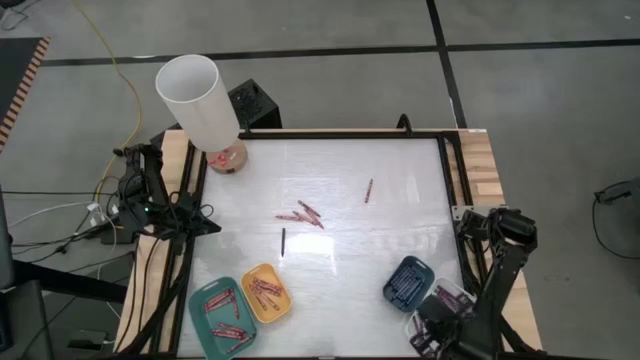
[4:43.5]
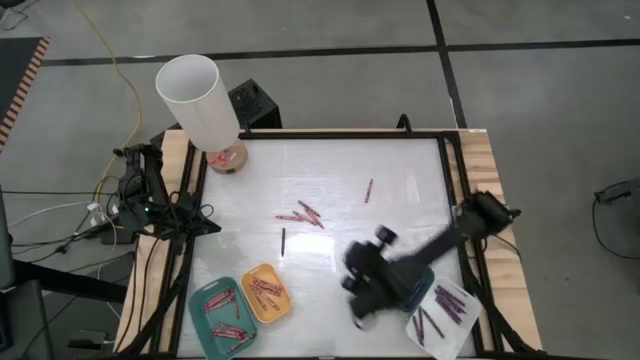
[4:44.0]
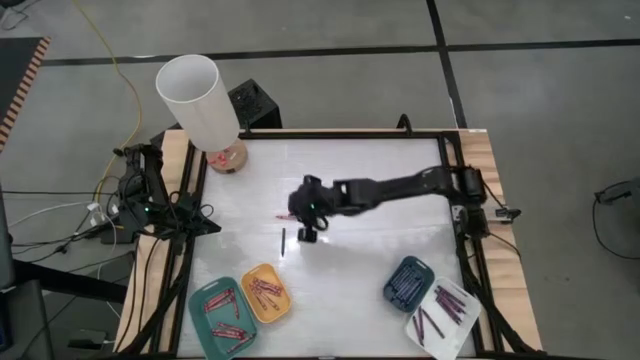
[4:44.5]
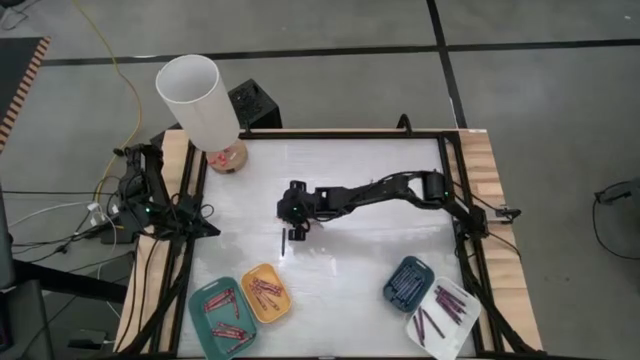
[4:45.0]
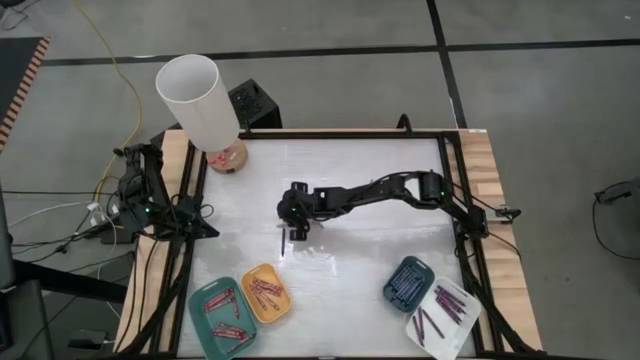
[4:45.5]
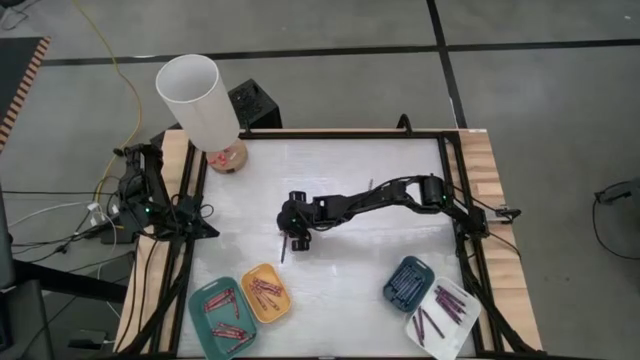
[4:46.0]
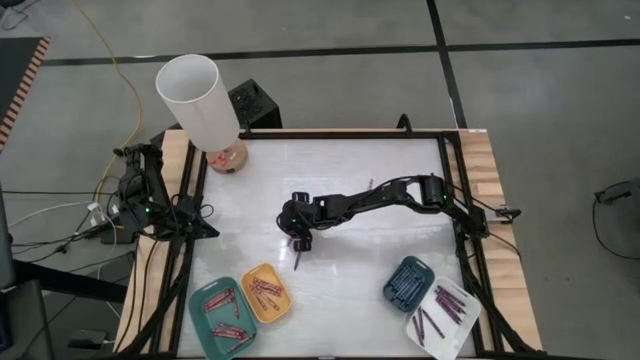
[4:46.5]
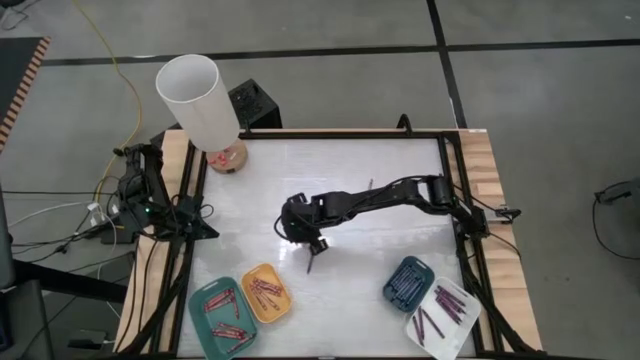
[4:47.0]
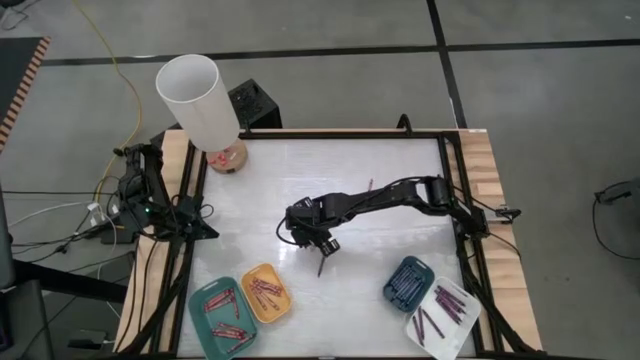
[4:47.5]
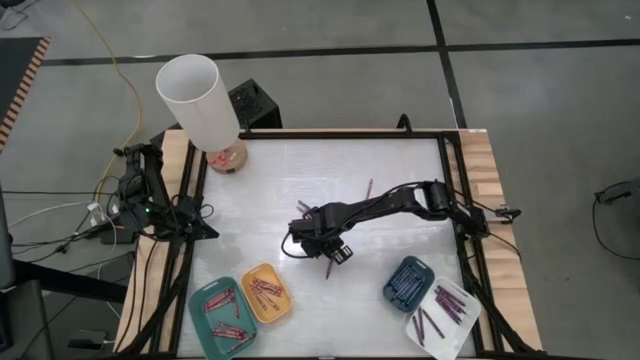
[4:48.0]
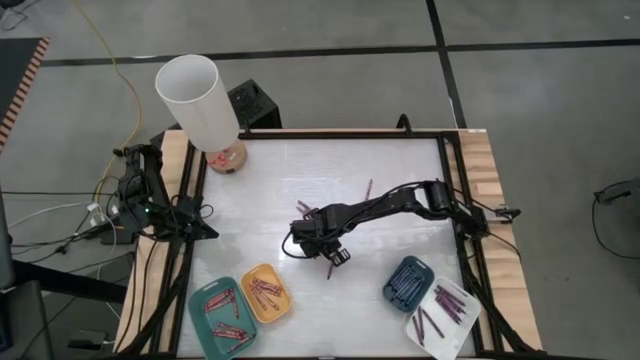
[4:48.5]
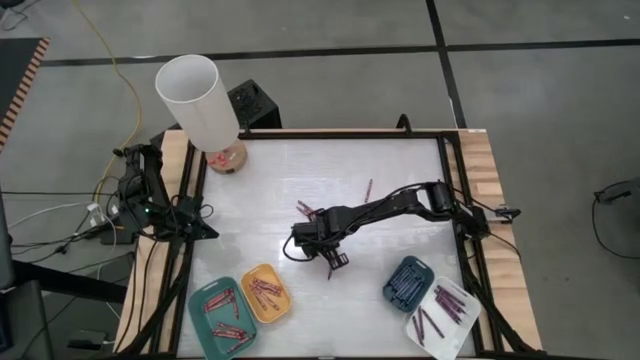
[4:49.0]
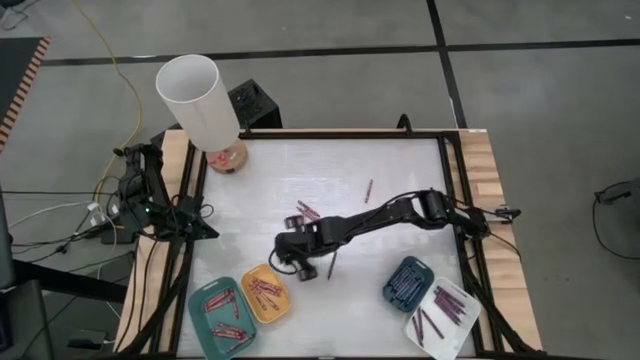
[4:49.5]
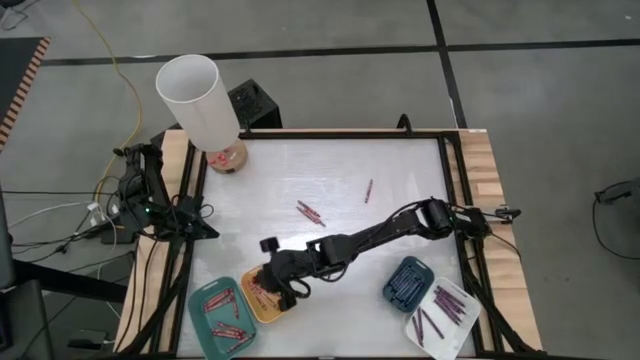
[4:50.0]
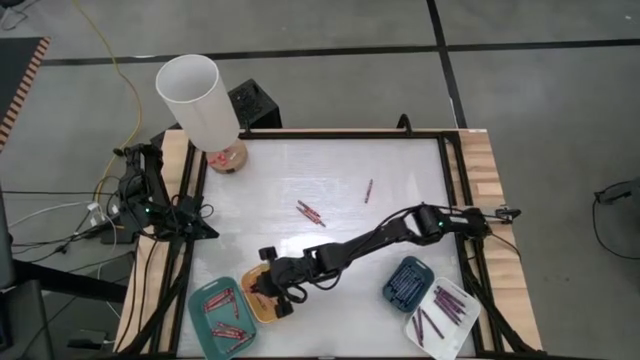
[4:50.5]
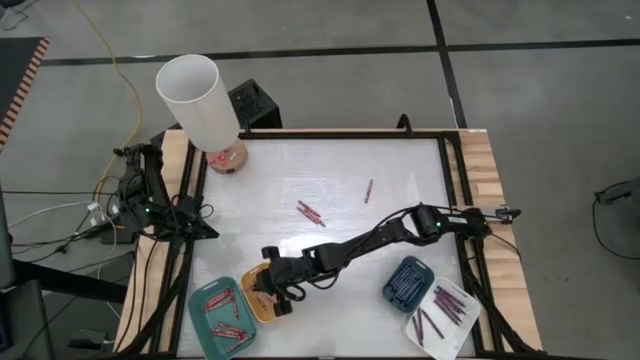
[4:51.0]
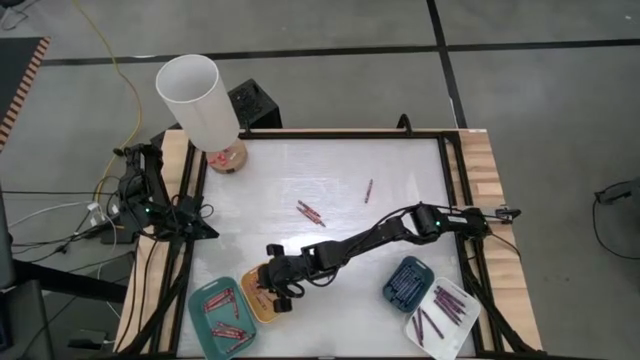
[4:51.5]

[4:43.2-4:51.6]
Task: Sort crayons
Put the pink crayon into the yellow bin

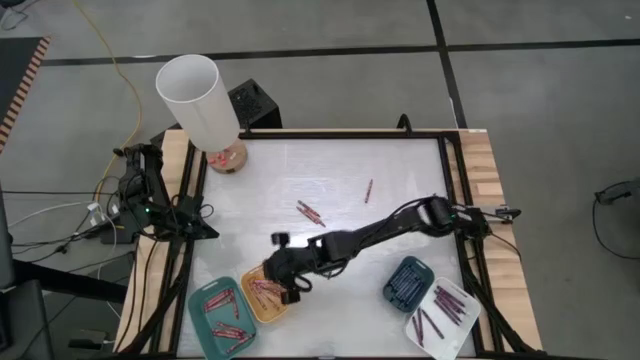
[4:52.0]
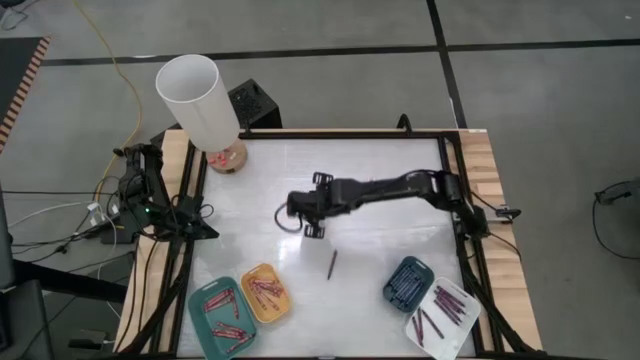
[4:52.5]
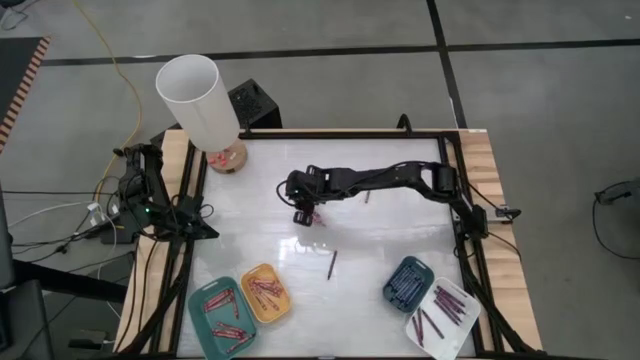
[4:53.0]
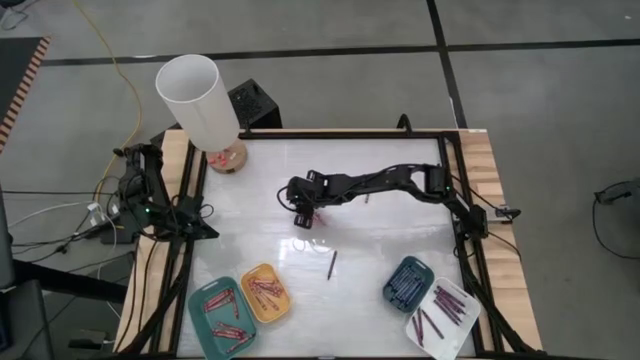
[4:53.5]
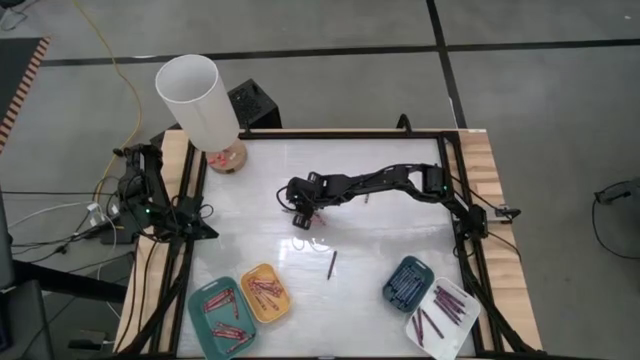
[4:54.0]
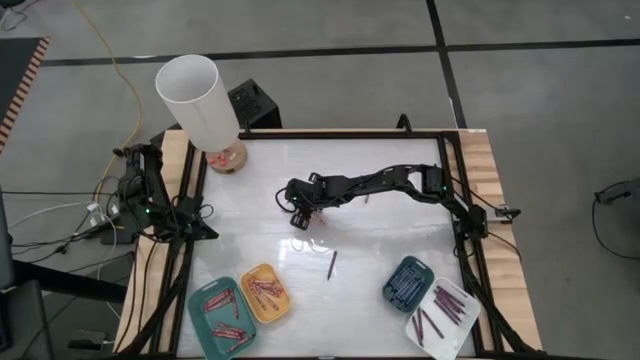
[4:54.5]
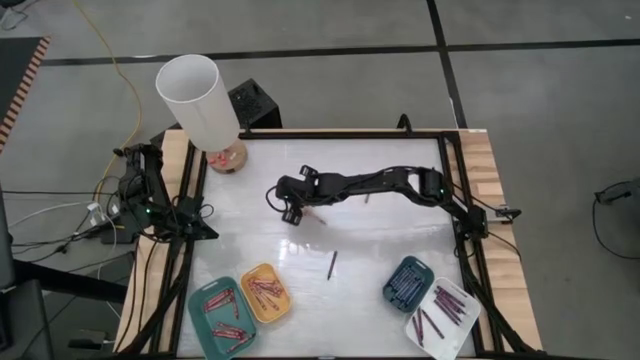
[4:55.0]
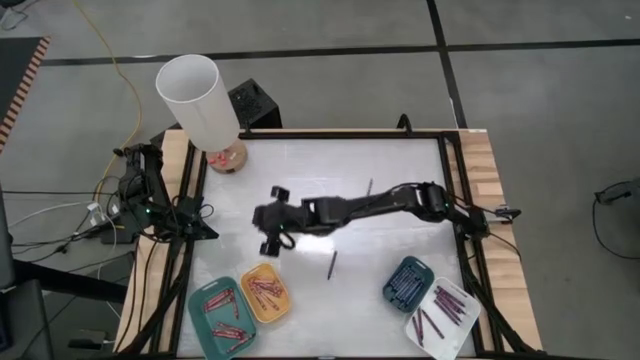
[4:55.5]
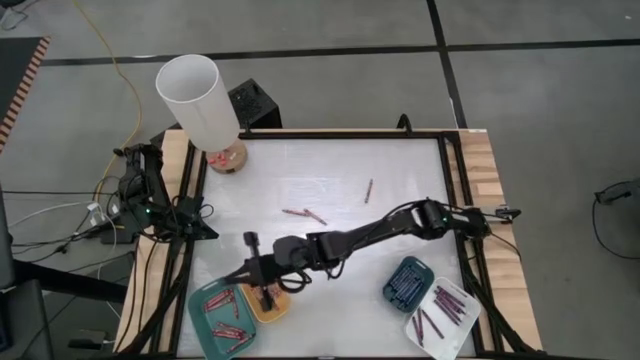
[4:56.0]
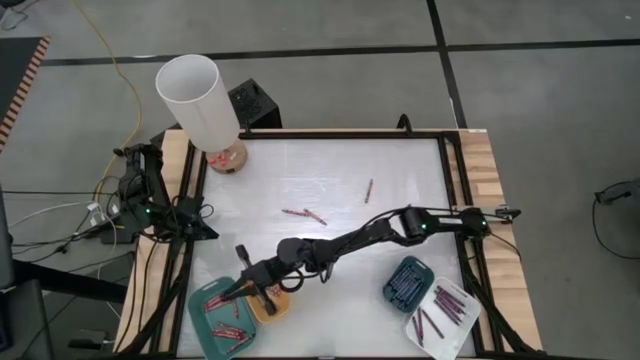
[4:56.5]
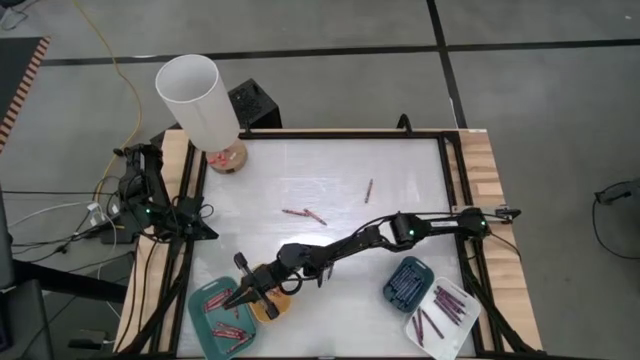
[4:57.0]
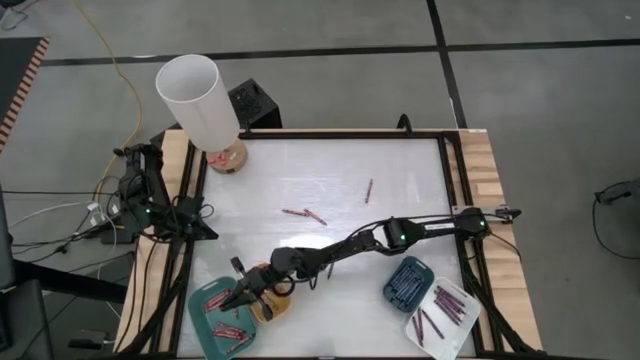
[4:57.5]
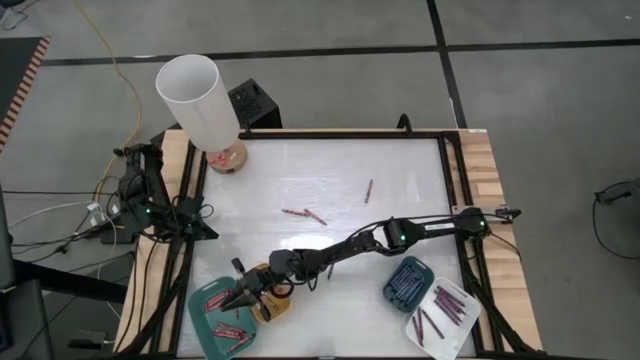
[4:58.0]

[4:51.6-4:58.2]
Put the red crayon into the blue bin

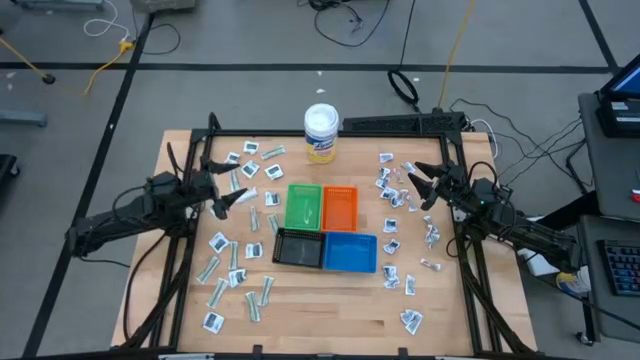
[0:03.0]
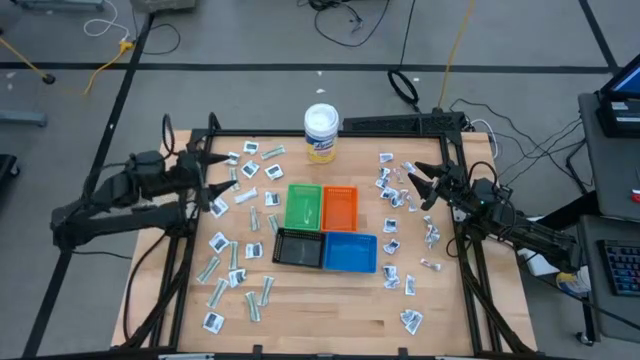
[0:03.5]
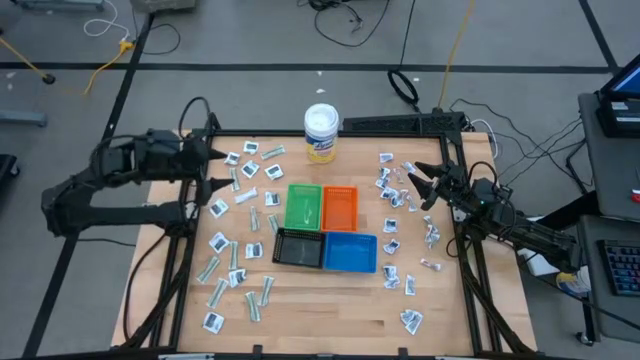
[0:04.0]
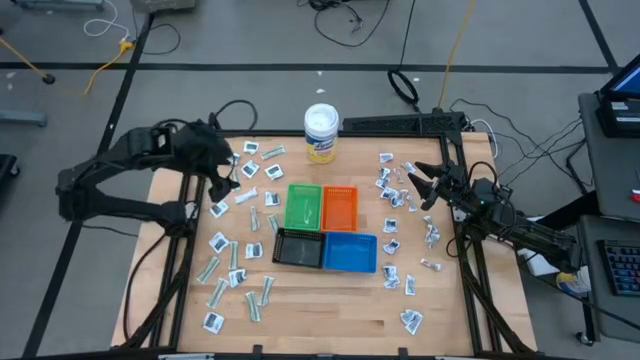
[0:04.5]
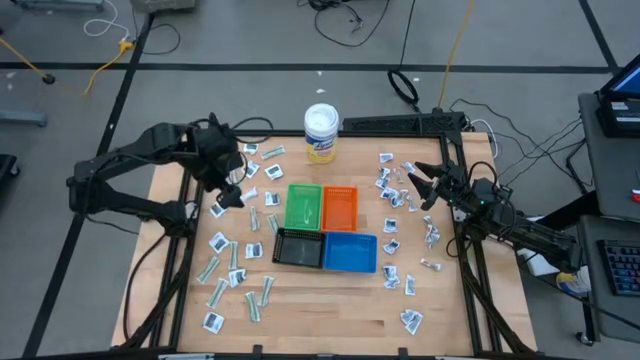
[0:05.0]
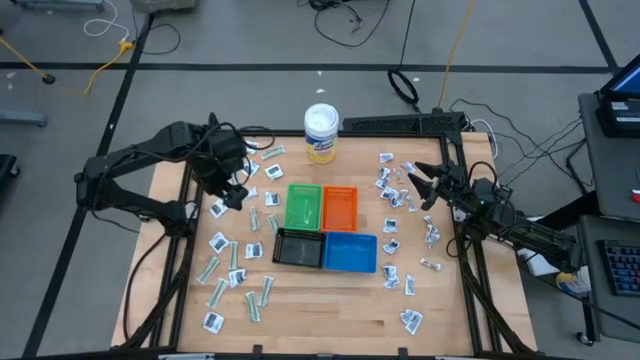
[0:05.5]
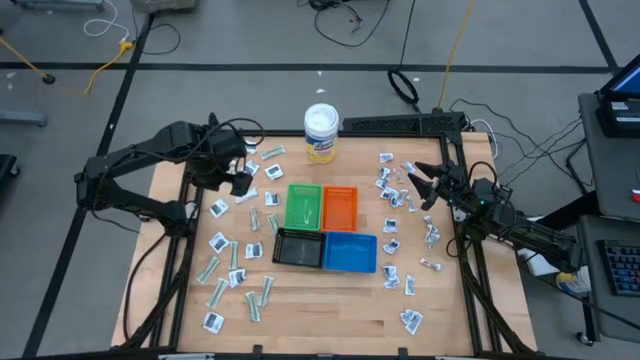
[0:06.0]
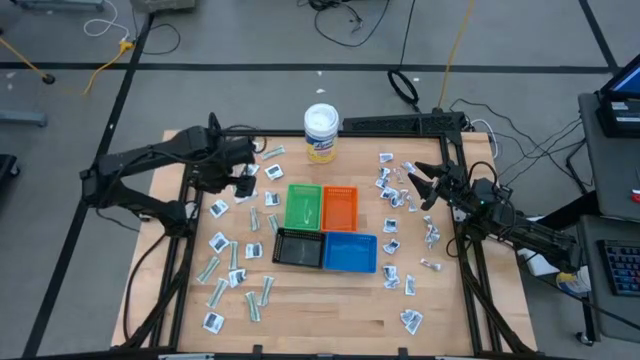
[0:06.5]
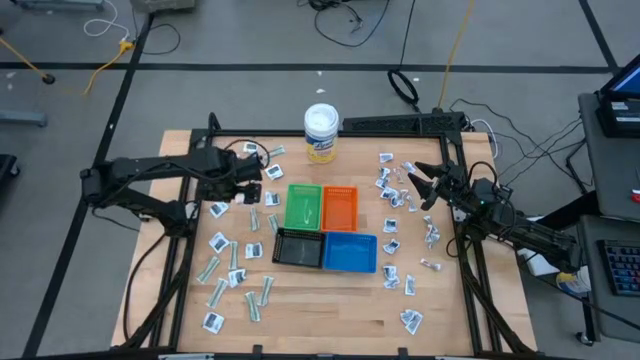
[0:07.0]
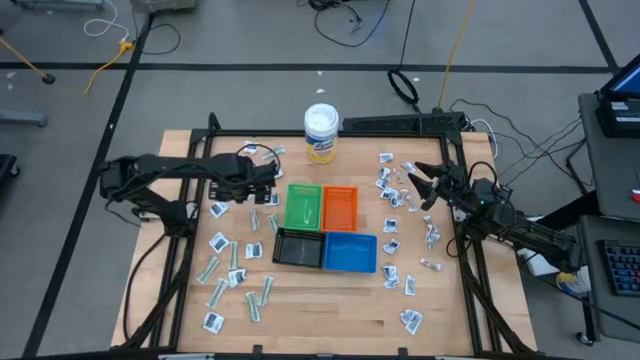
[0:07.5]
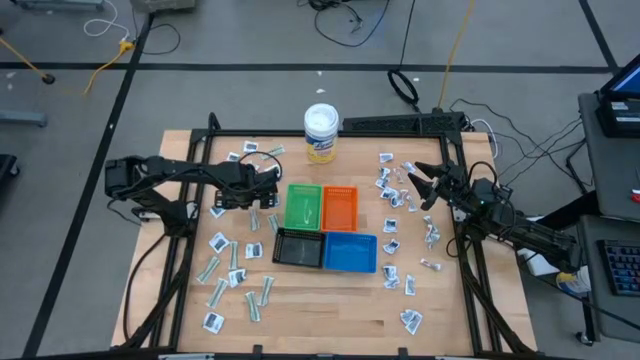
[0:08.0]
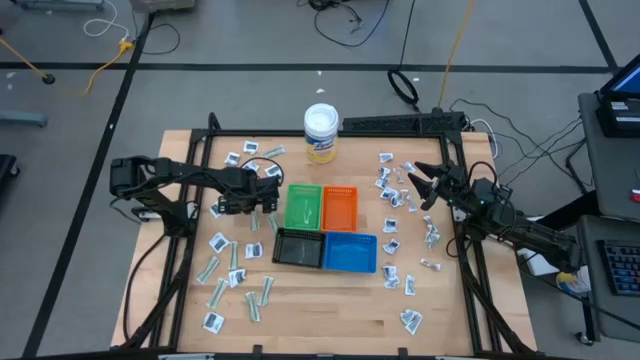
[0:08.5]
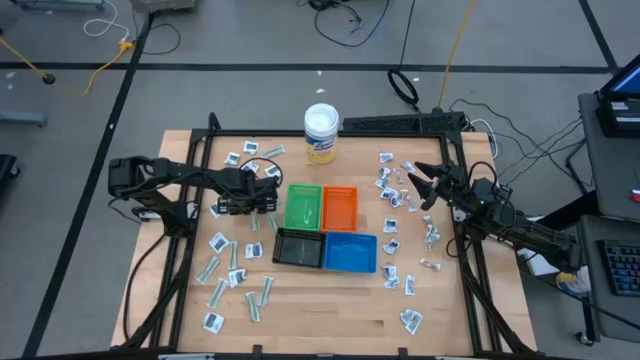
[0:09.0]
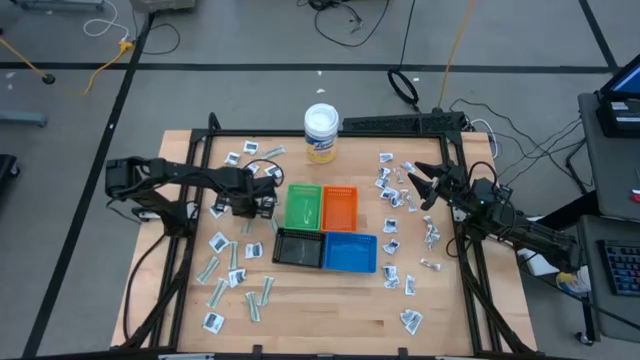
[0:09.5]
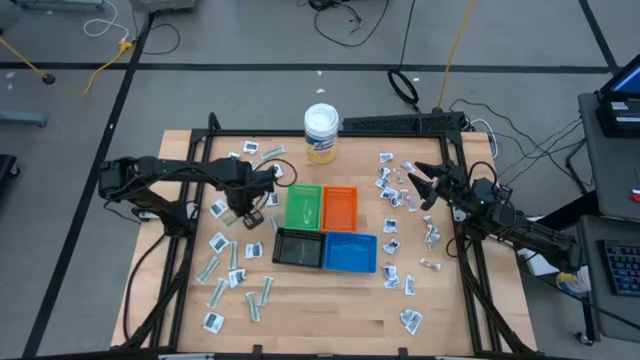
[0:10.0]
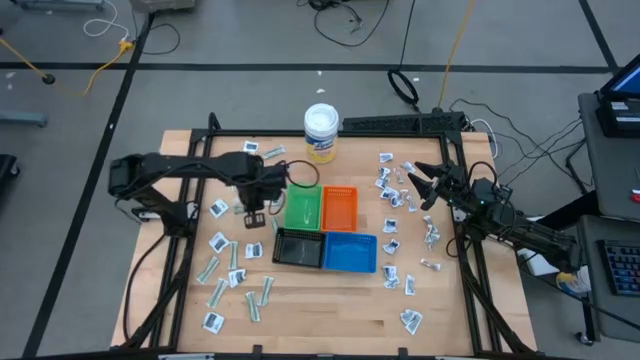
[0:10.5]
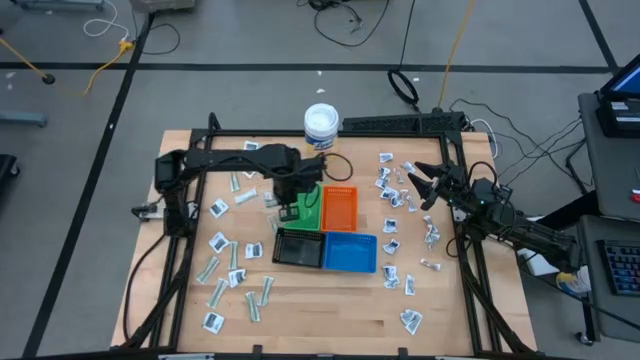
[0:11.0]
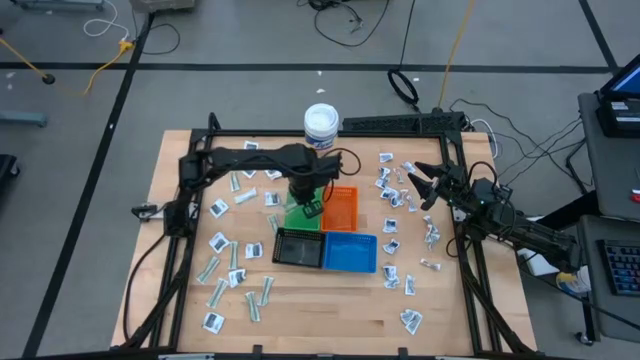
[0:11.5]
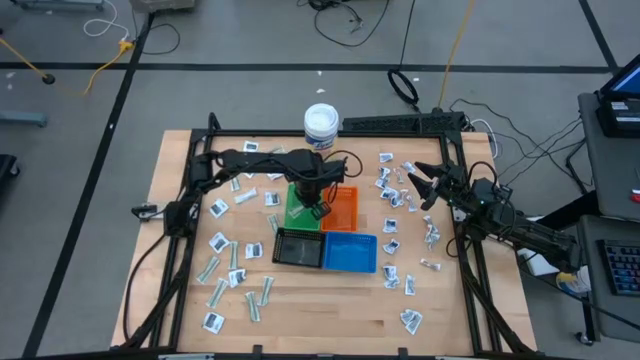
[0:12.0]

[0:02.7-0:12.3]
Task: Pick & Place First Aid Supplies
Put the bandage pack into the green bin
